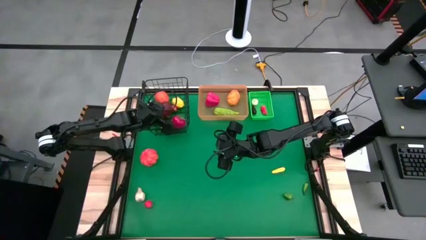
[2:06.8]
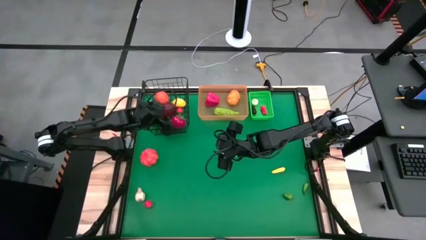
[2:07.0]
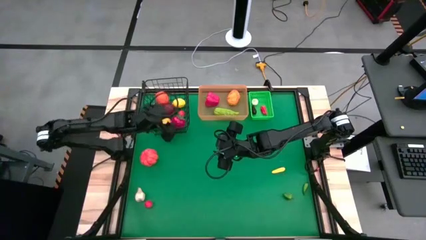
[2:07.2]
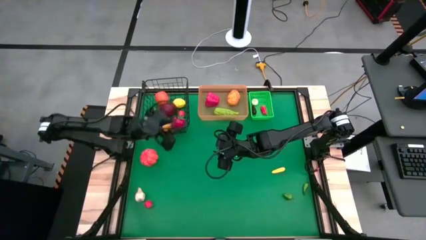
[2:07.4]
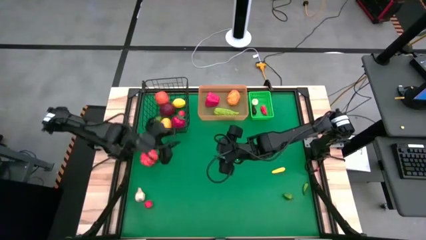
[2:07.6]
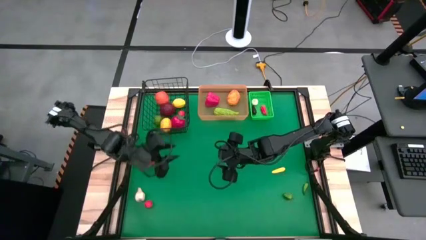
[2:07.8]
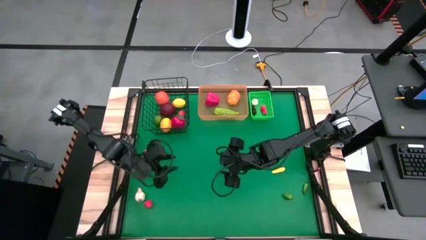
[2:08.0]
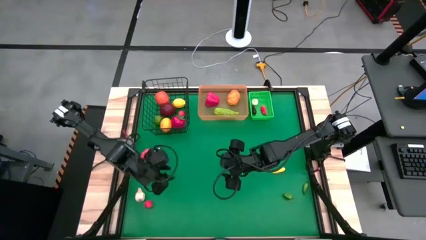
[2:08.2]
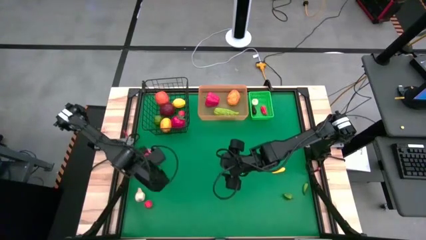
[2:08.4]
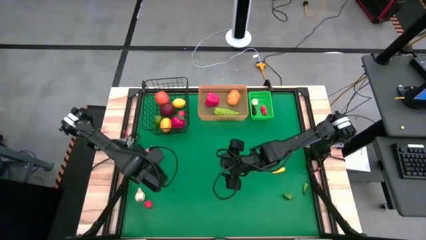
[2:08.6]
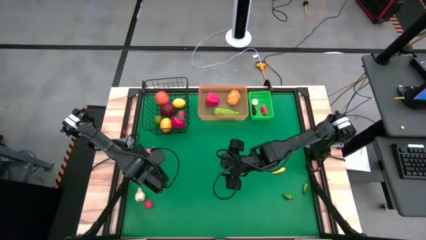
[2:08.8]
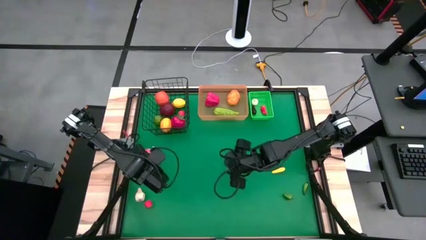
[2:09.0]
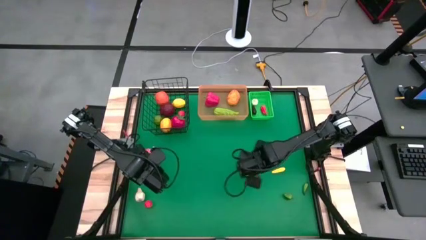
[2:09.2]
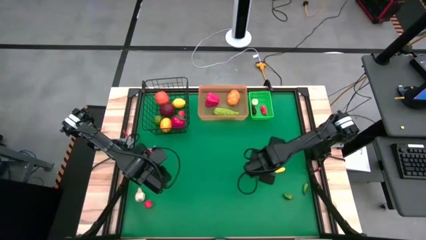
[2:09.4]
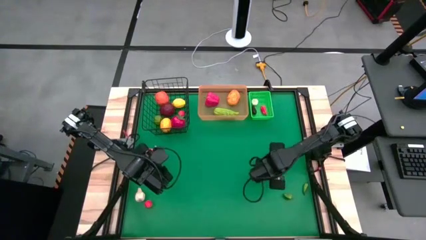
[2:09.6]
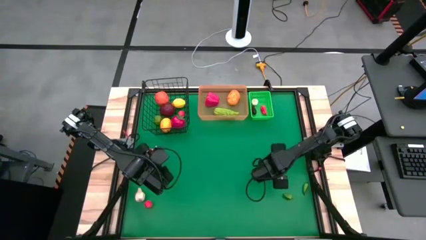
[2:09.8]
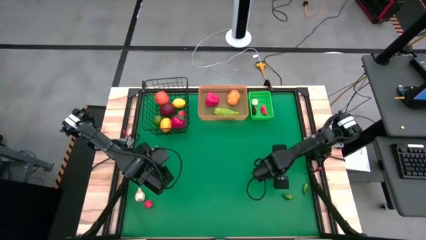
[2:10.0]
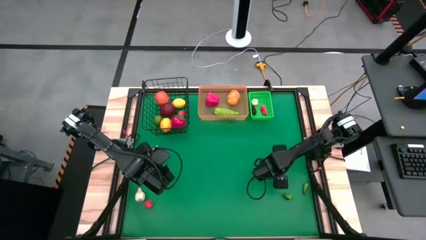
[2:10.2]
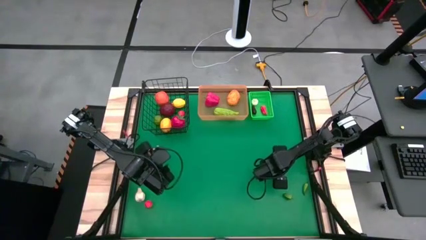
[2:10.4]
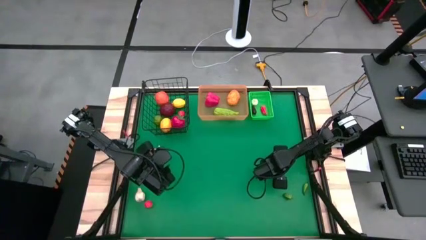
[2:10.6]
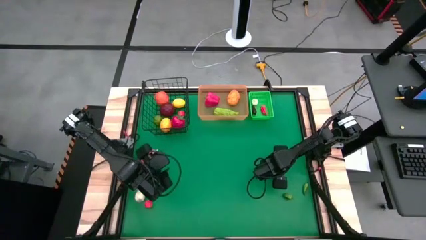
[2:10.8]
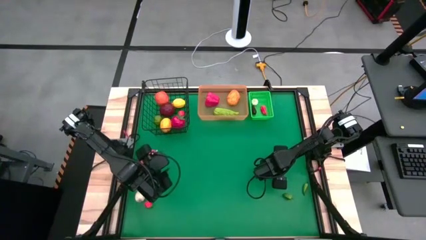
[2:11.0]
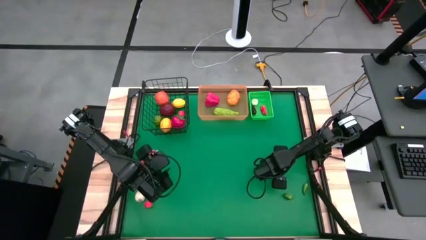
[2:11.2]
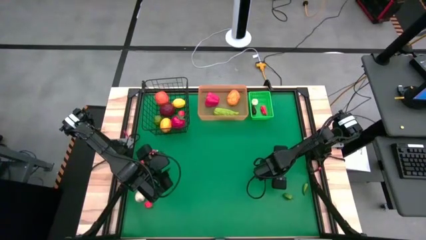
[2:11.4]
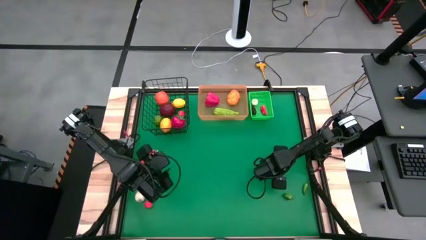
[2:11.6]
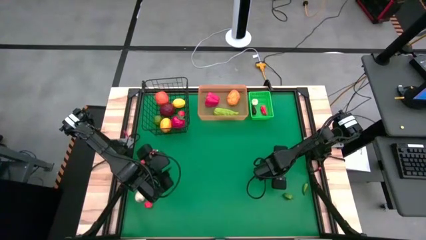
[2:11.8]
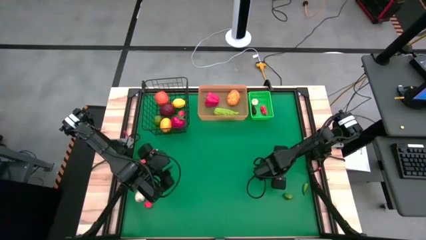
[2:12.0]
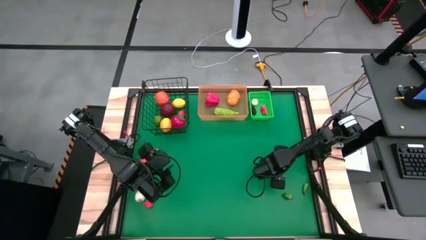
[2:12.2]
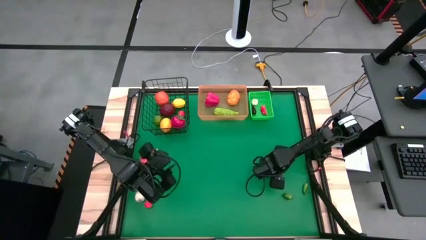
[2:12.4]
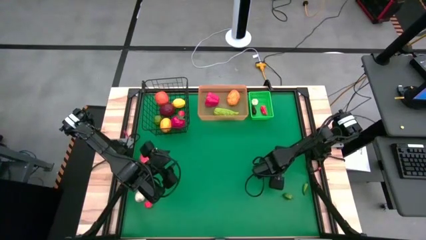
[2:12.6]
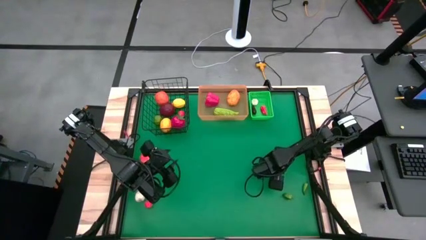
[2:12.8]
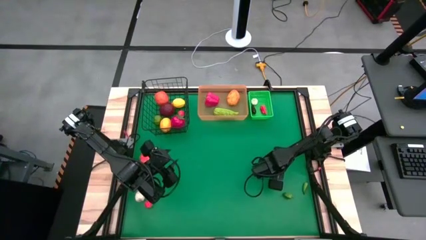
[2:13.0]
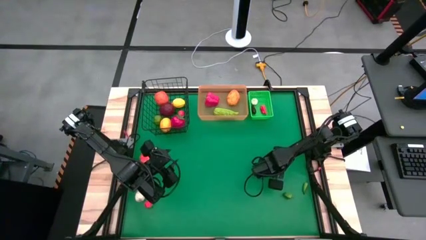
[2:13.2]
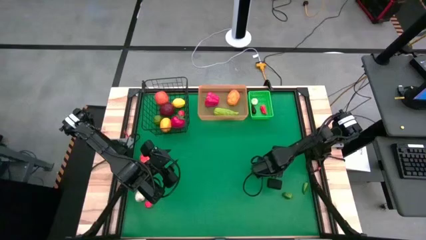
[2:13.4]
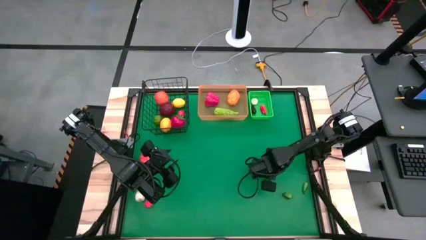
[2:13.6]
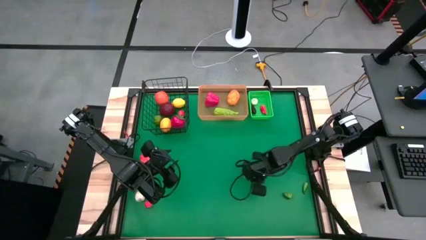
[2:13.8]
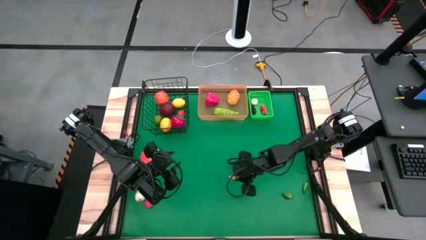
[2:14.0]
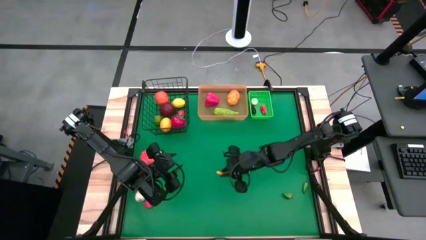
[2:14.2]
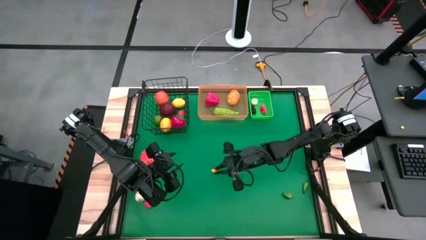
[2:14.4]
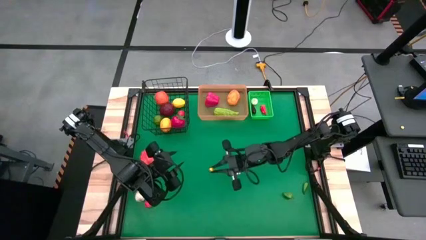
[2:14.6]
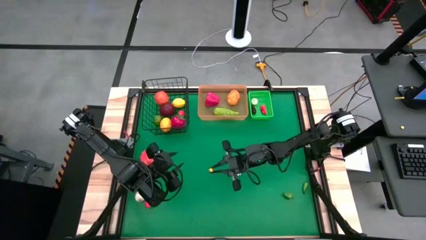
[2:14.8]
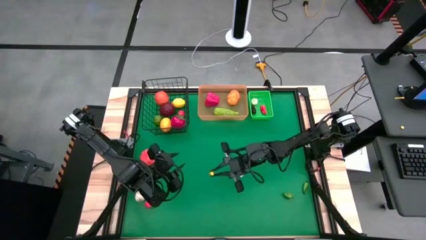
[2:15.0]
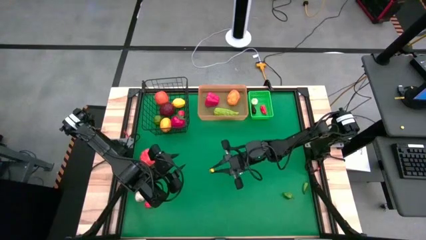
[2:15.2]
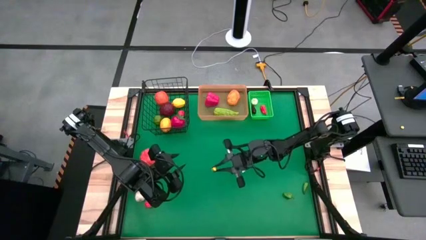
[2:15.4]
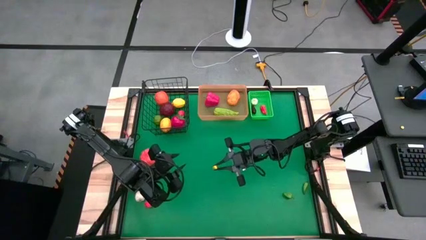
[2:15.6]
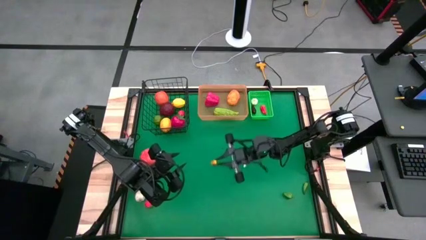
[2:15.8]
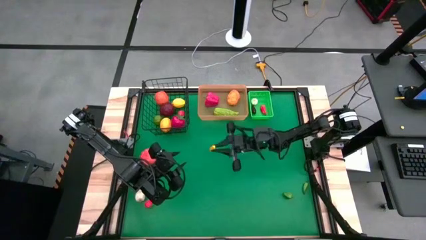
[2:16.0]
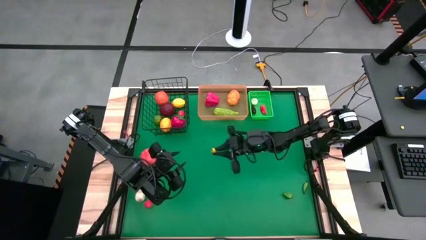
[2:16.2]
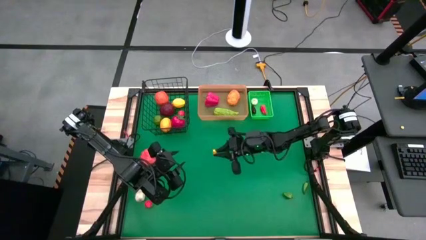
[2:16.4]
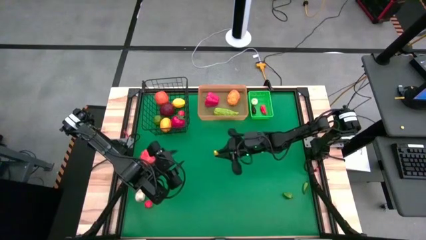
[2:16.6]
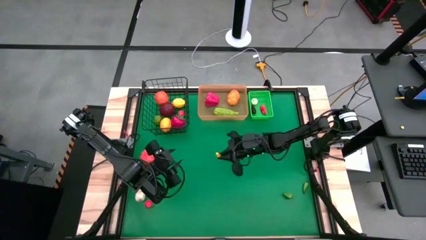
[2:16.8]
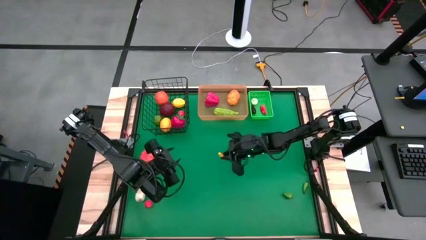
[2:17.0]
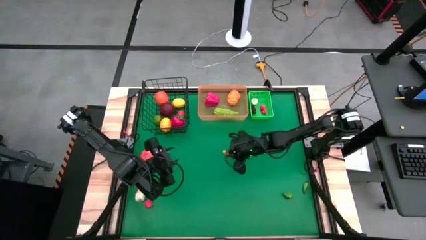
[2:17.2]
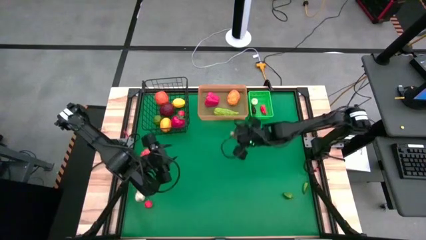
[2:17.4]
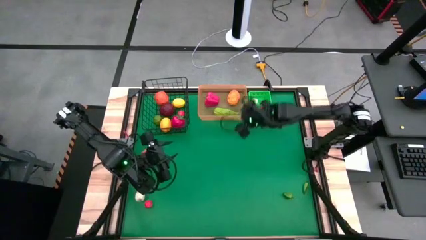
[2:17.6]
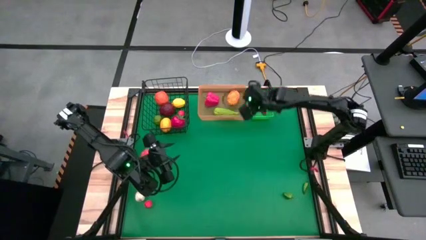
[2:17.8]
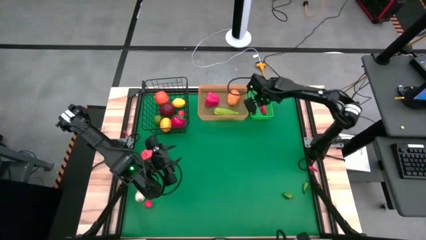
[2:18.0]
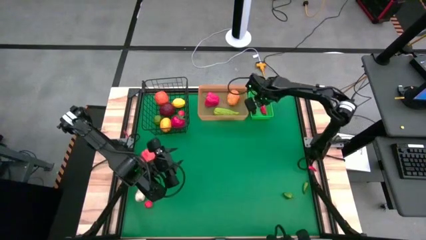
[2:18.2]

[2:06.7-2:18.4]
Task: Sort produce into baskets
Put the yellow corn into the green basket

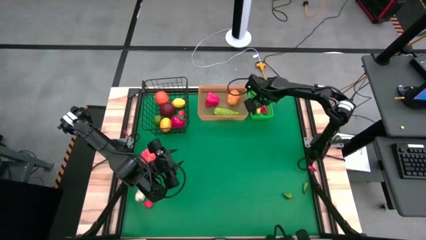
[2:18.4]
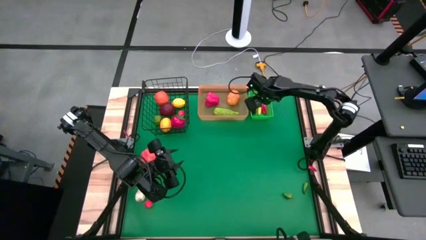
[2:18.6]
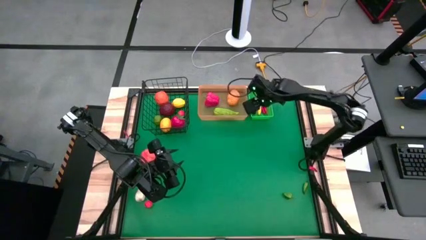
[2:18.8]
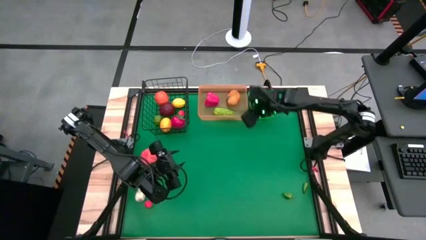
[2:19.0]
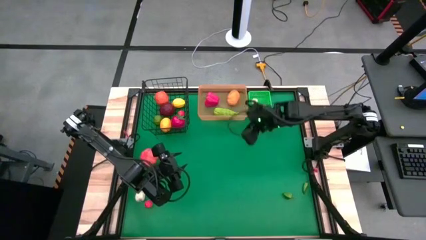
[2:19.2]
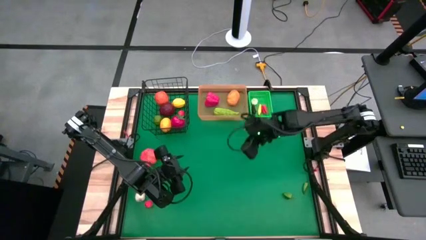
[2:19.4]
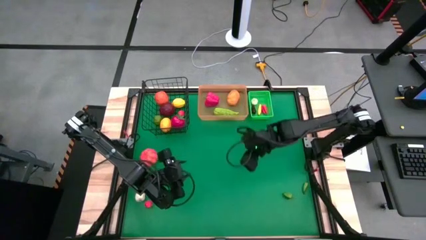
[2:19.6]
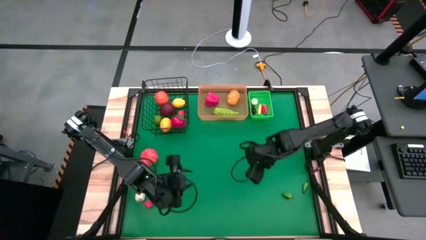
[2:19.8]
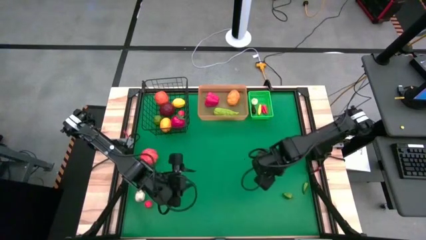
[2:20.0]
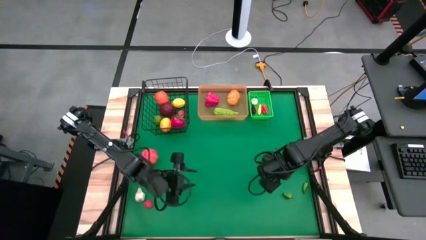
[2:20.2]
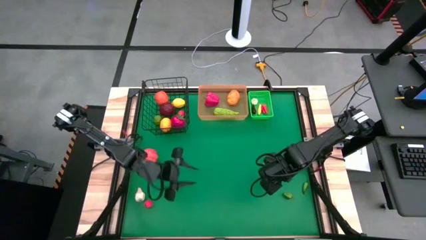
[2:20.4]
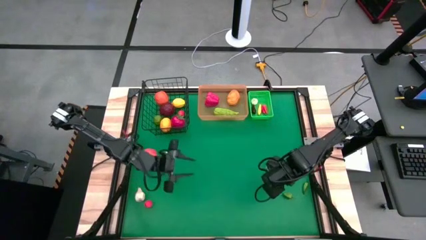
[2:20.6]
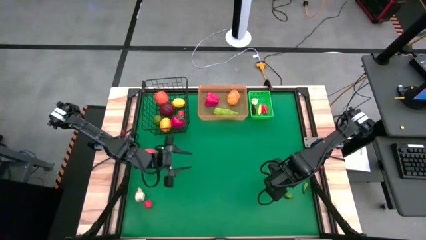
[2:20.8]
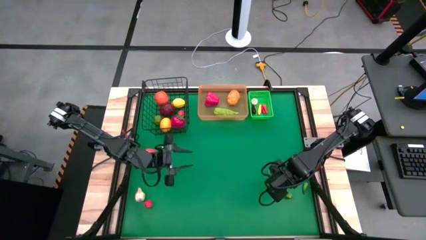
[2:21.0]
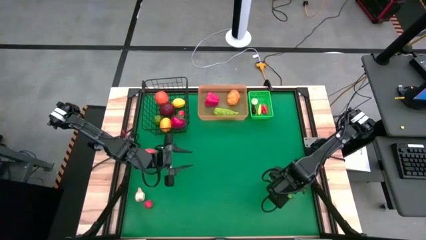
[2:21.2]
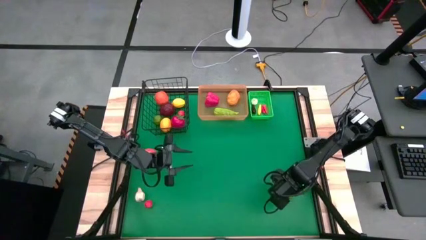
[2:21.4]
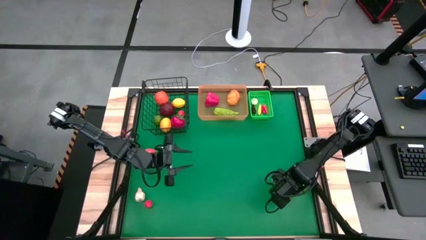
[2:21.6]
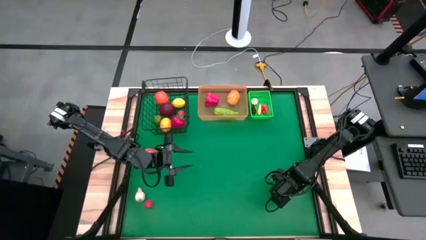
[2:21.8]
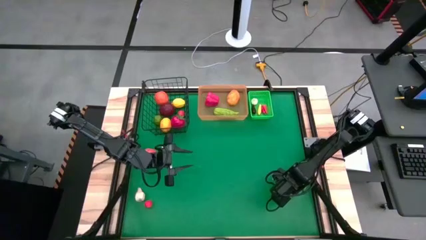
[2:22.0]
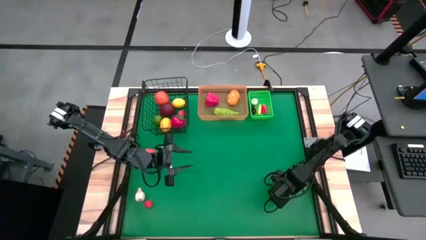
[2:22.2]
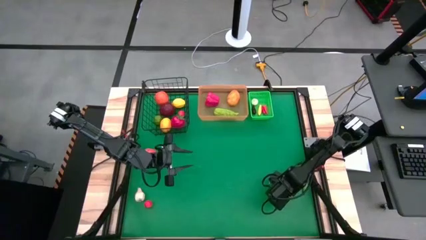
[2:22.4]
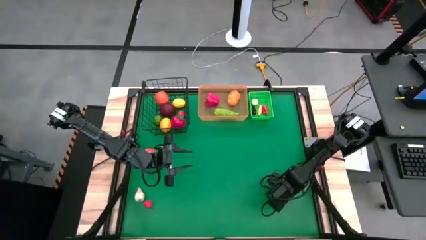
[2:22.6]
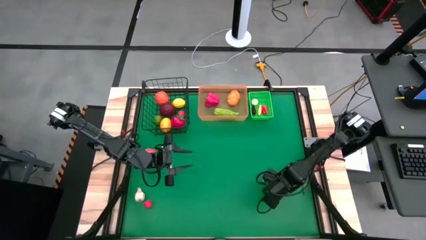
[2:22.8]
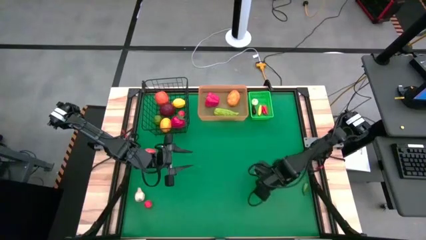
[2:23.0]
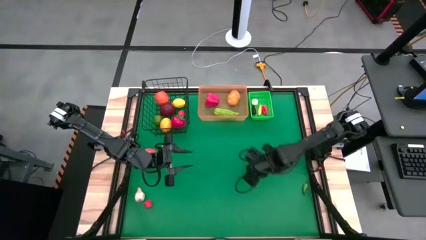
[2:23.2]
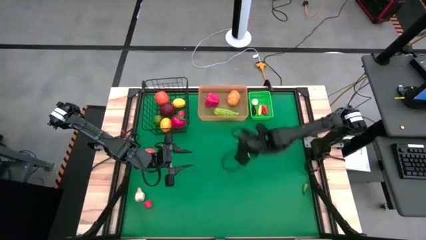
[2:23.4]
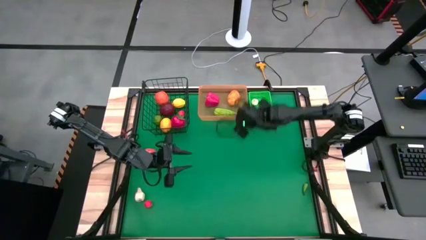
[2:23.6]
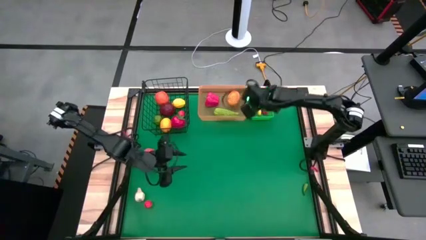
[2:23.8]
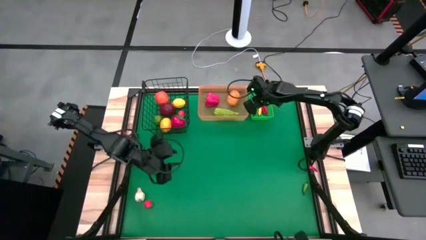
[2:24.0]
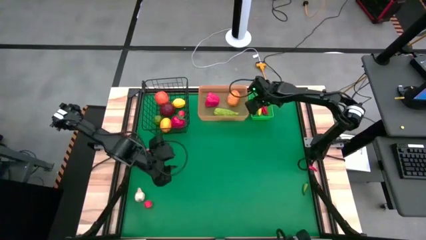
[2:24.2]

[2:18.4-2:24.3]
Put the green bell pepper into the green basket
